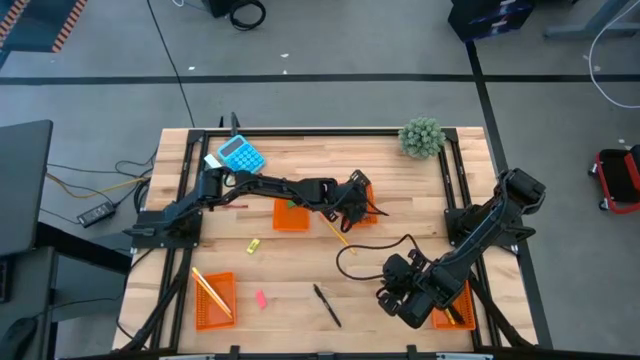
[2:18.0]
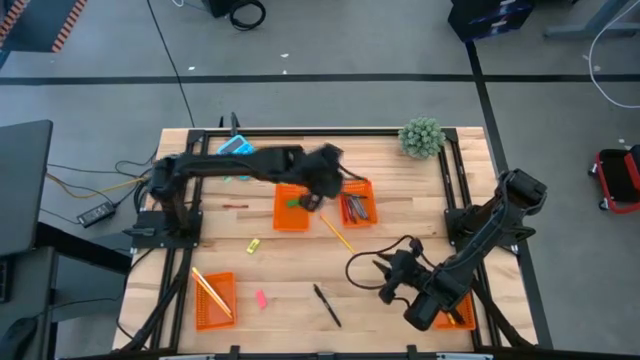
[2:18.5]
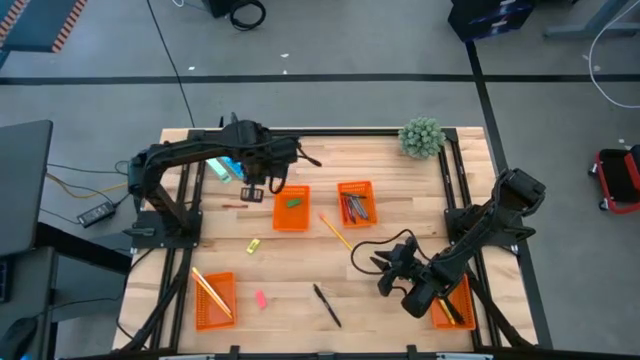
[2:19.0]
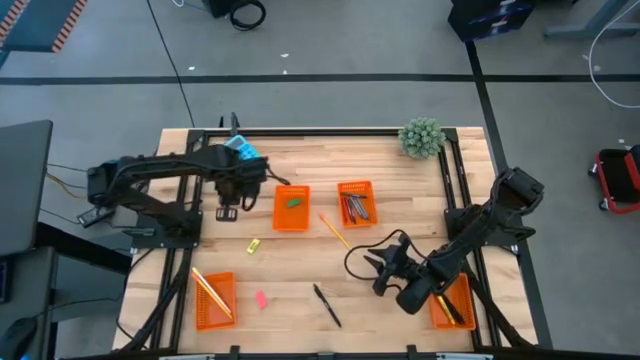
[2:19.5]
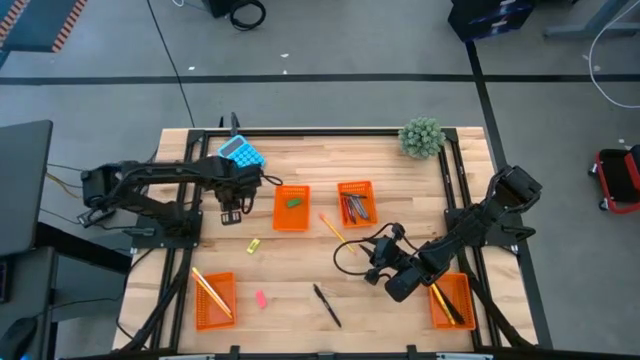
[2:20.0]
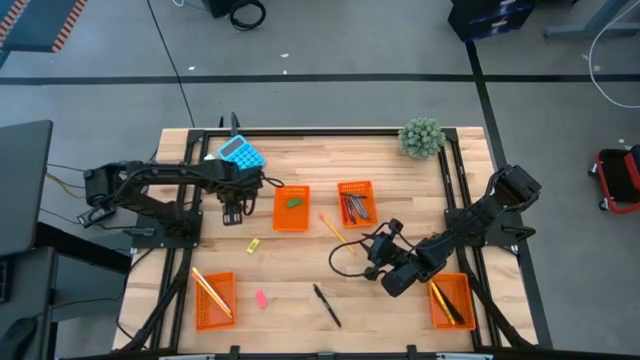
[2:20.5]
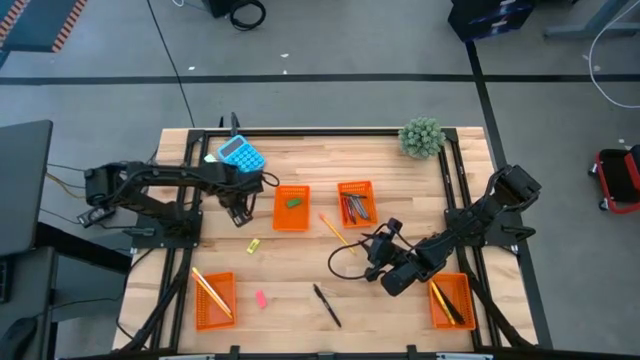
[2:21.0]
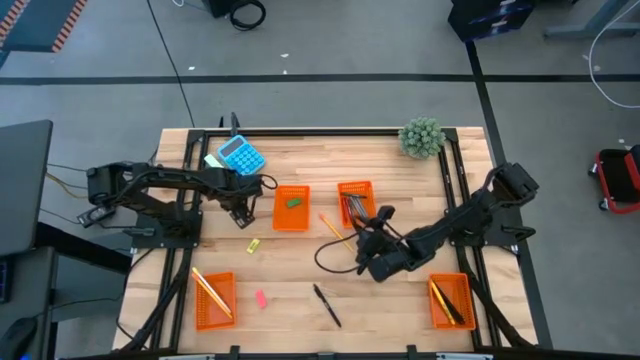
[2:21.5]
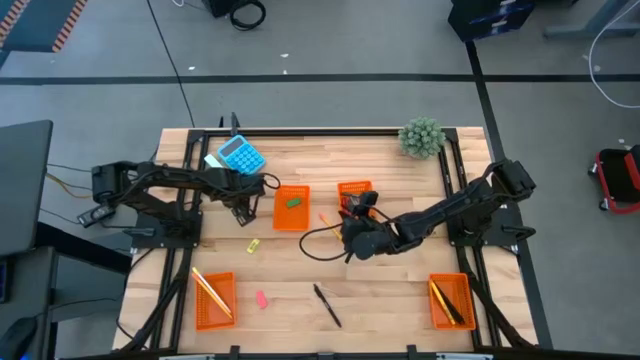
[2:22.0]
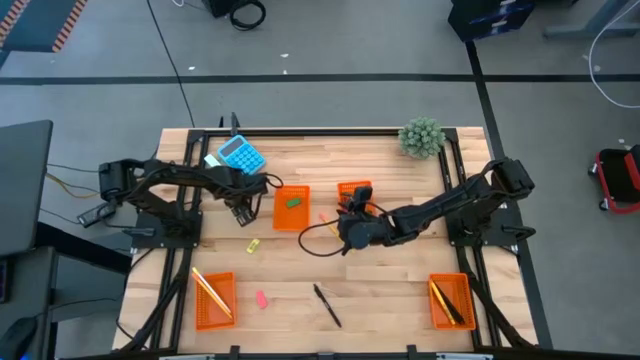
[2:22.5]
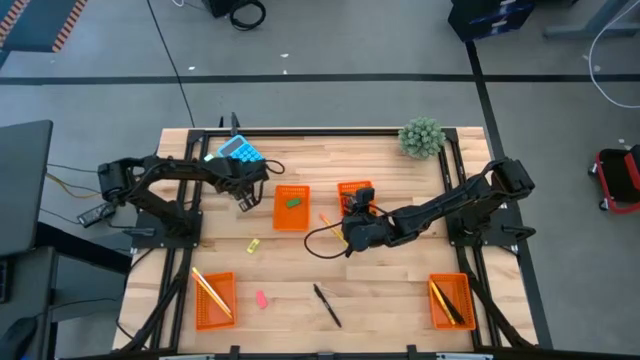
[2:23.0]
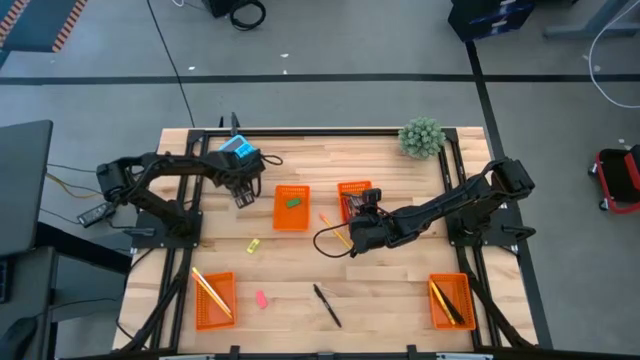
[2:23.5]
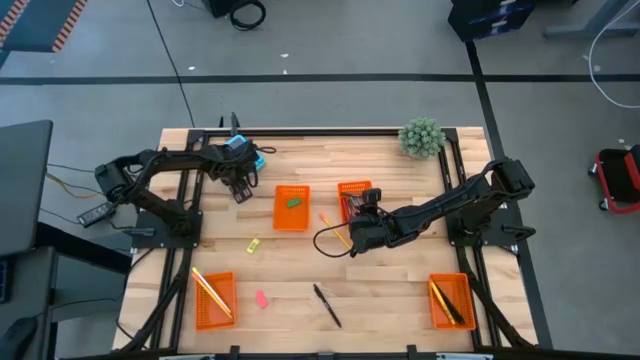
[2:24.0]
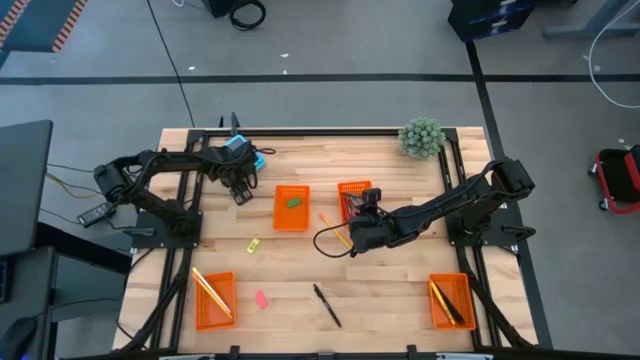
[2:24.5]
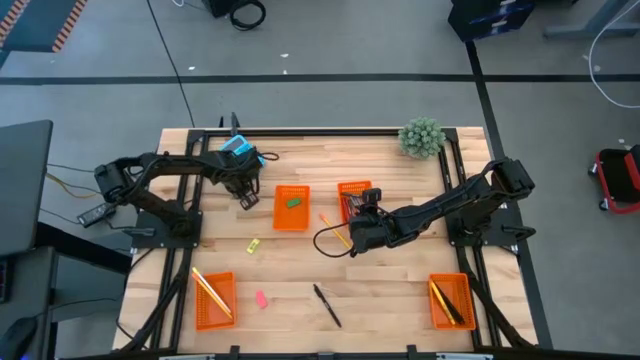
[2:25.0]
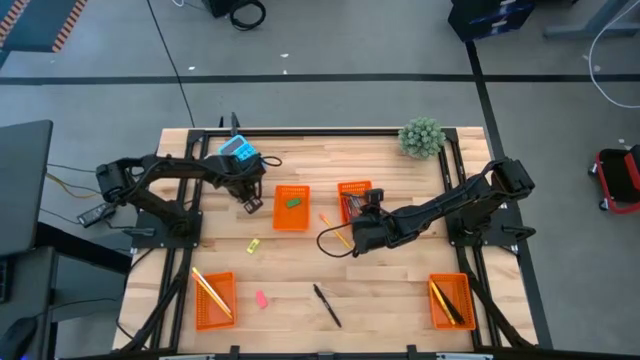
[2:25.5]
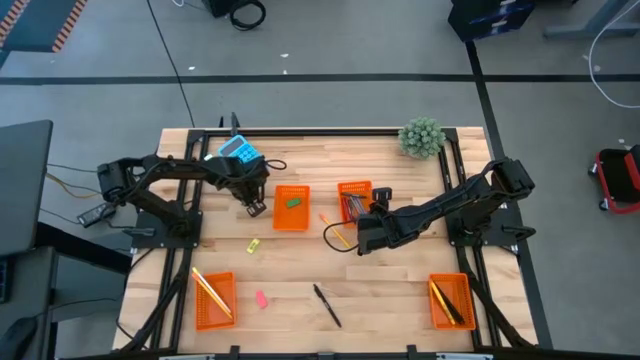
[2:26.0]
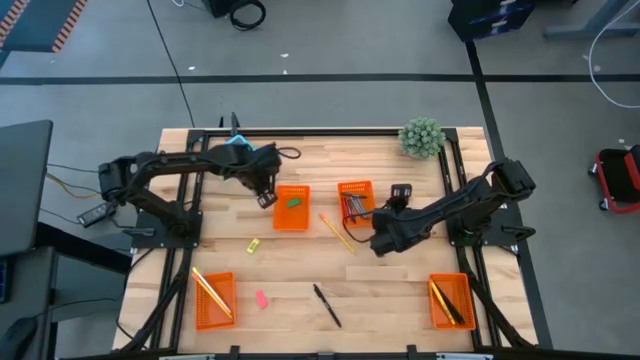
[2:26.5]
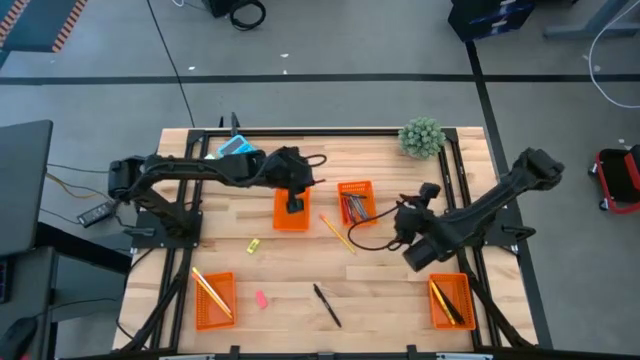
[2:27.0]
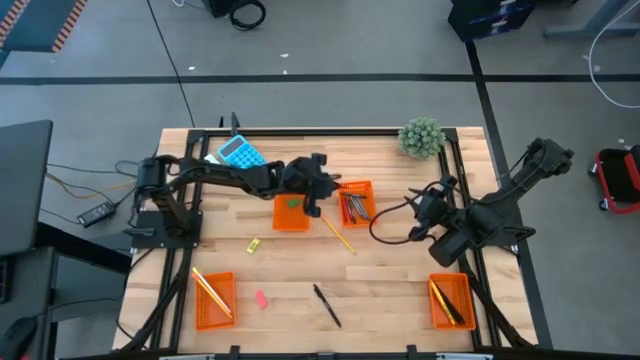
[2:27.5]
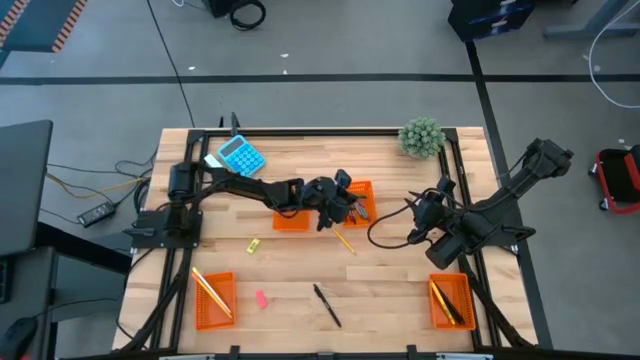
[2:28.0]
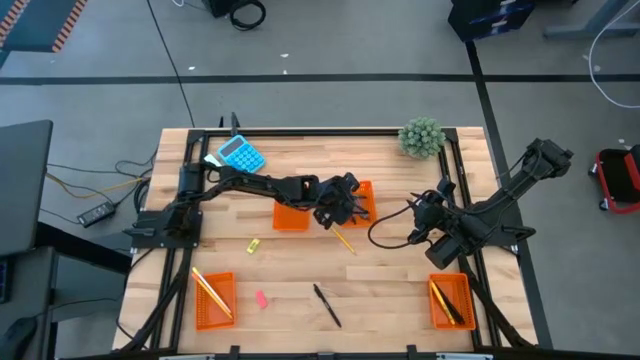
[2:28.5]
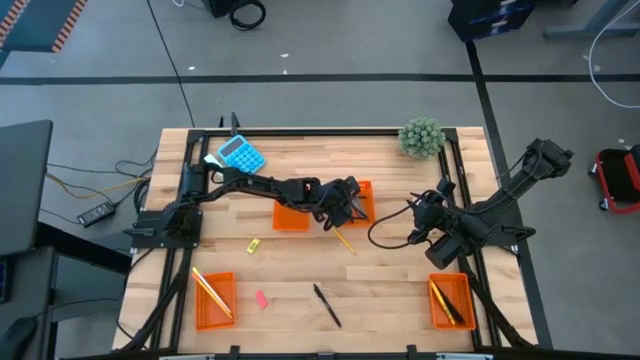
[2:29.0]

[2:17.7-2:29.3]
Task: Sort crayons/erasers/pens/pencils in bins
Put the red crayon into the top right orange bin

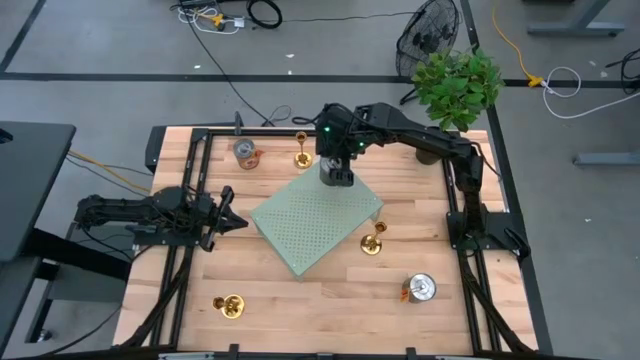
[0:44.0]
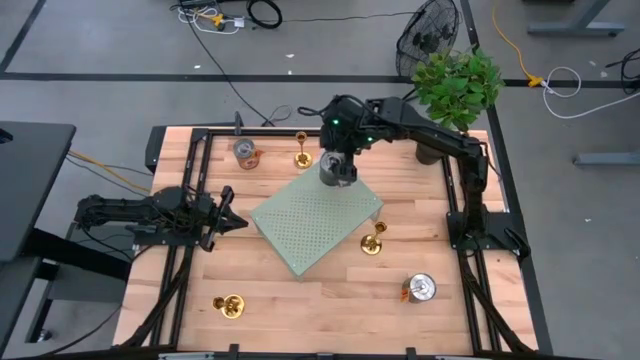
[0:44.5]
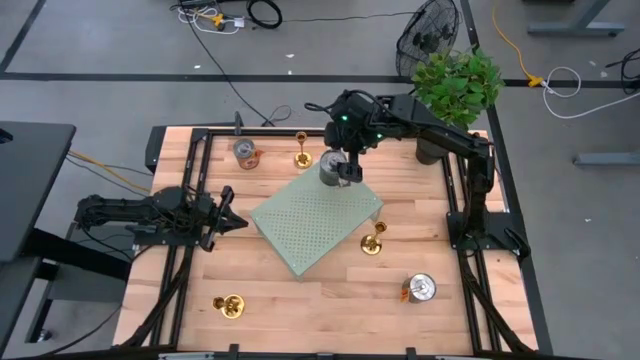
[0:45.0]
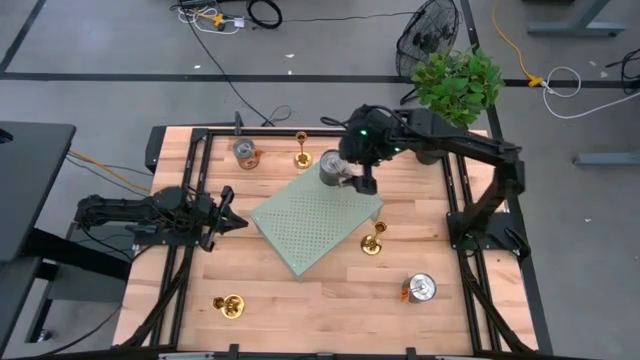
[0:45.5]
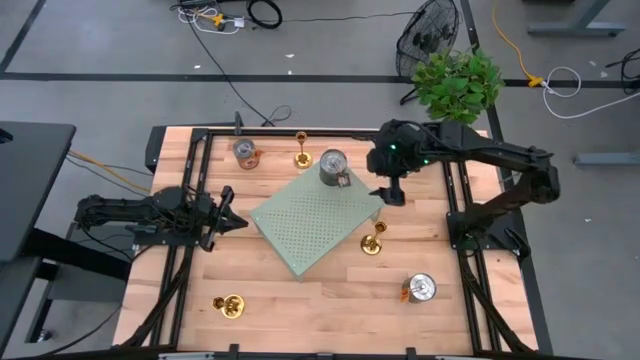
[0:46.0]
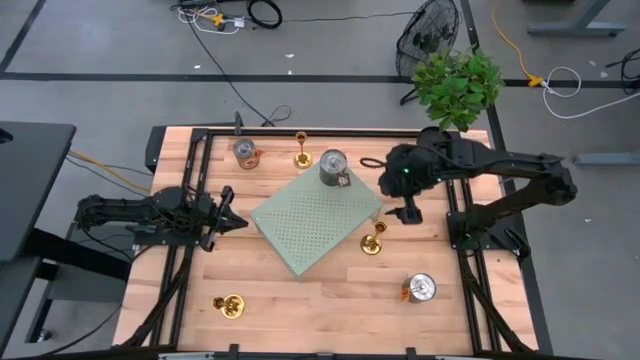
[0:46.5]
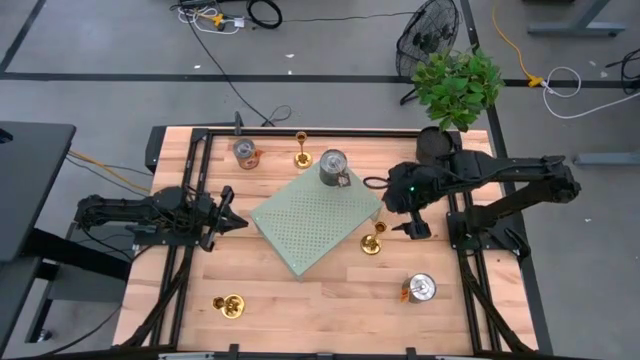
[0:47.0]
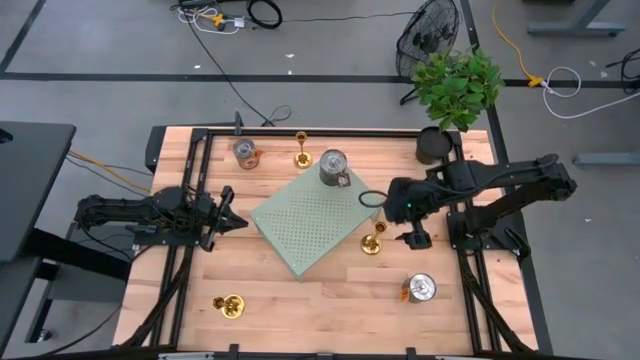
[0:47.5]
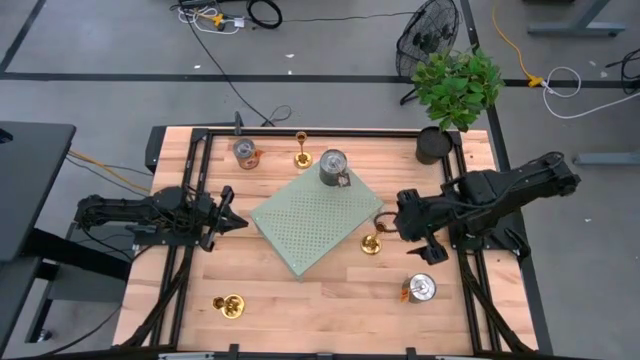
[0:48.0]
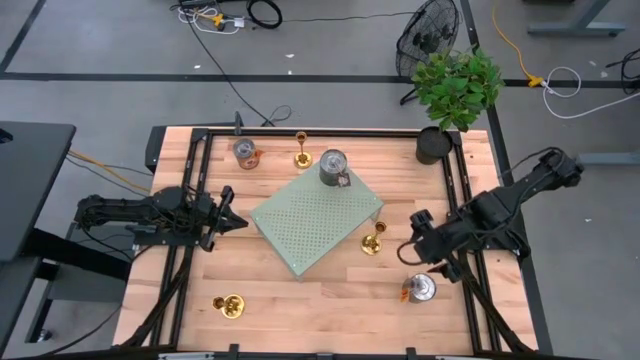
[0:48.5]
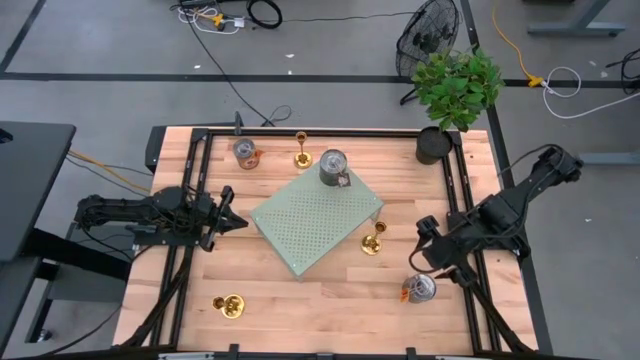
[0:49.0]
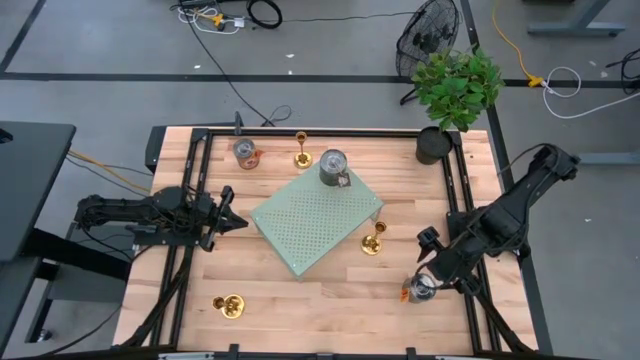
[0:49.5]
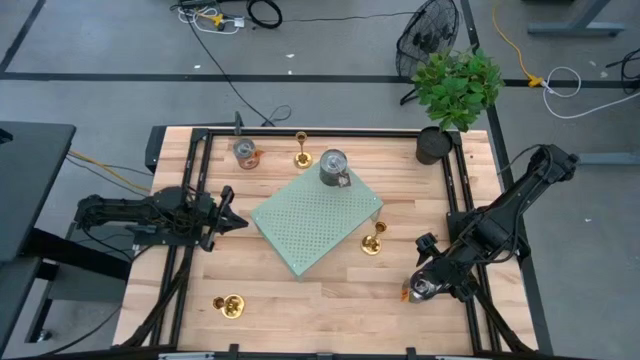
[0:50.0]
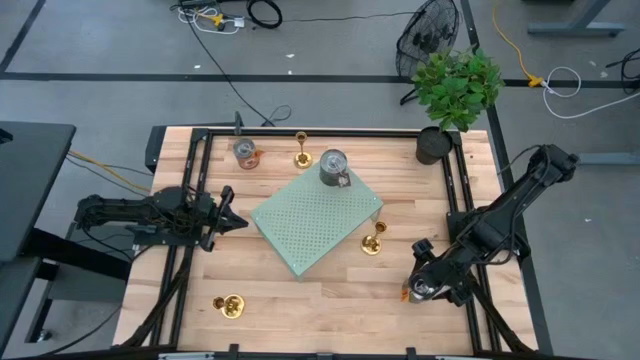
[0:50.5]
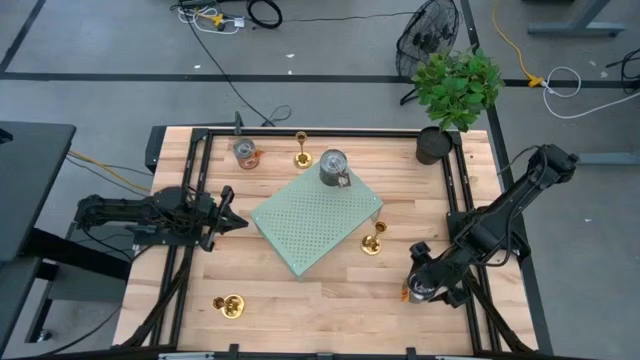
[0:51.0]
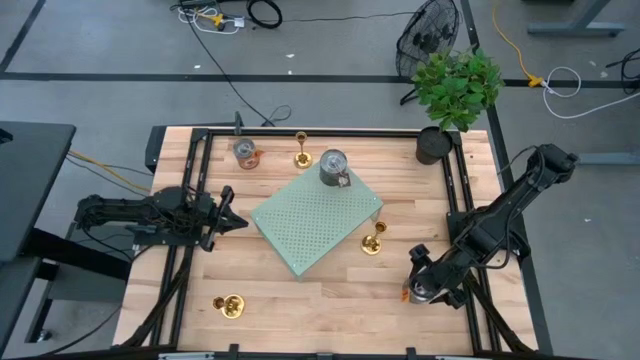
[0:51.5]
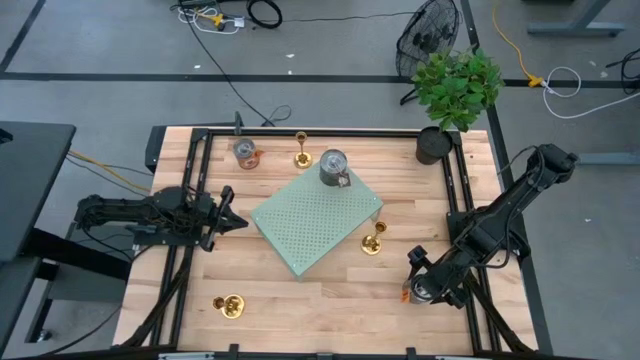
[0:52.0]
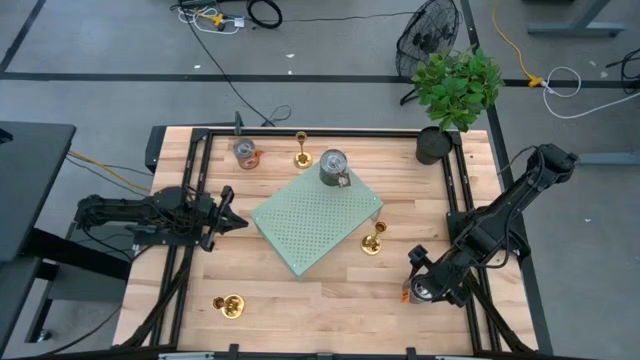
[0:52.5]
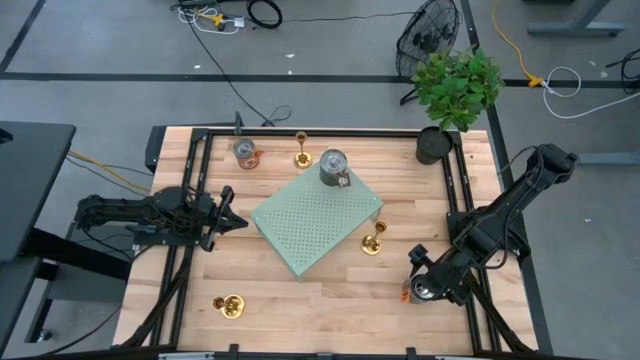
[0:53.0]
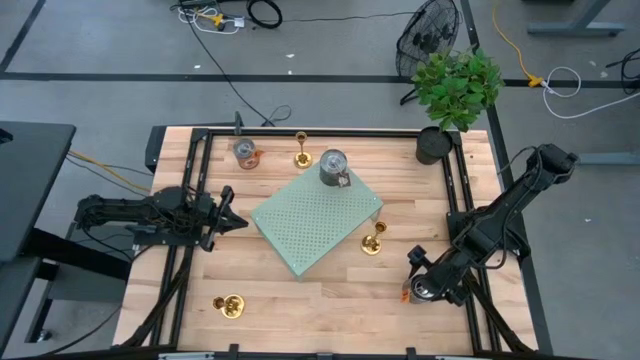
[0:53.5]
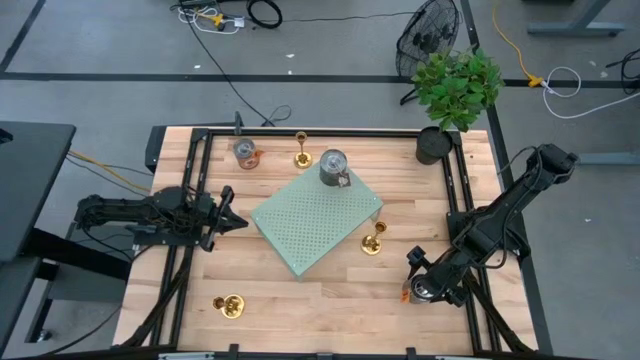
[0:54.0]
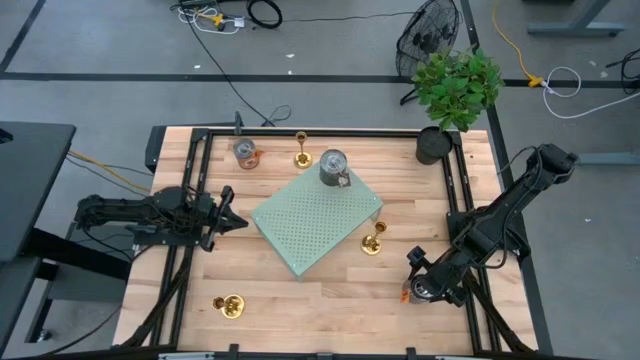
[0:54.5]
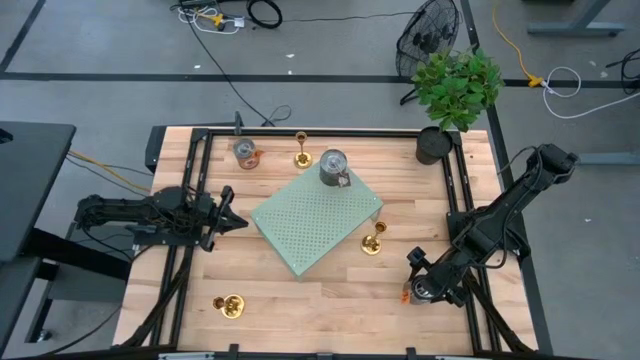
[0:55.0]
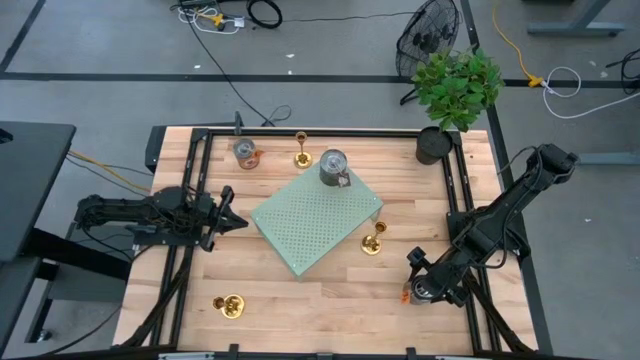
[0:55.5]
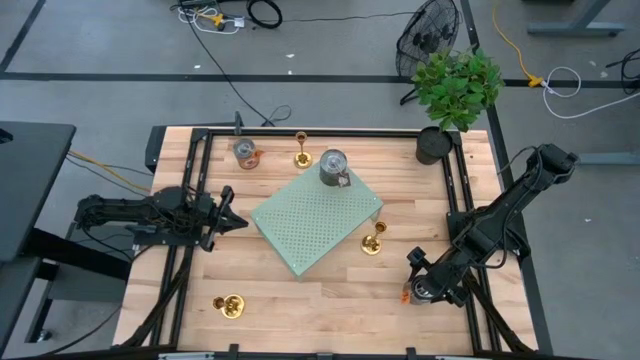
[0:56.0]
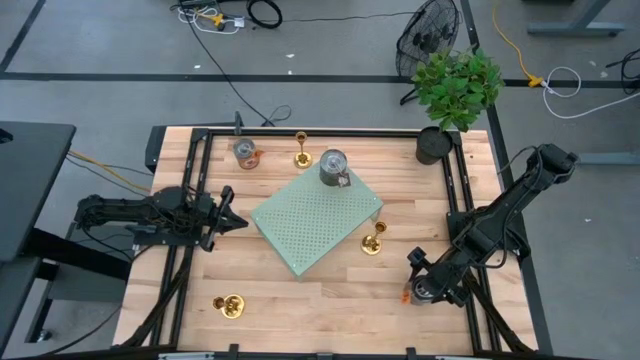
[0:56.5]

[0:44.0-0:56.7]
Task: Pick & Place candle stick holders
Put the bottom silver scented candle on the shelf
